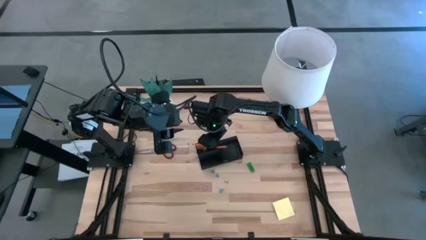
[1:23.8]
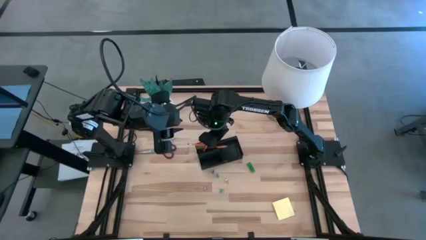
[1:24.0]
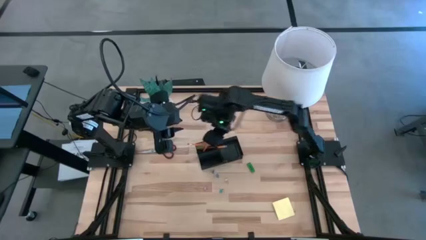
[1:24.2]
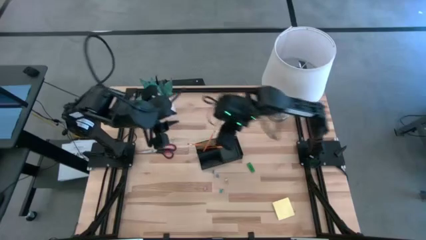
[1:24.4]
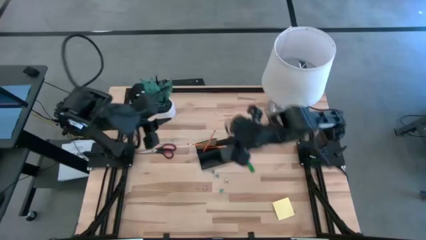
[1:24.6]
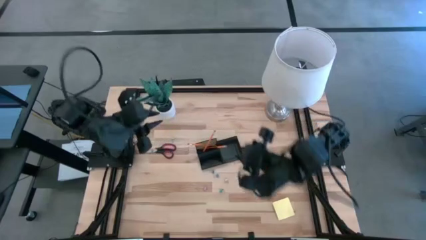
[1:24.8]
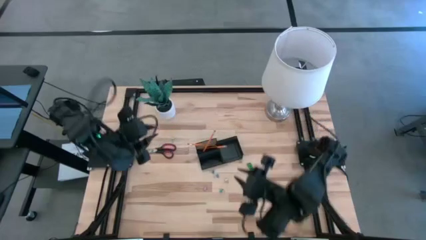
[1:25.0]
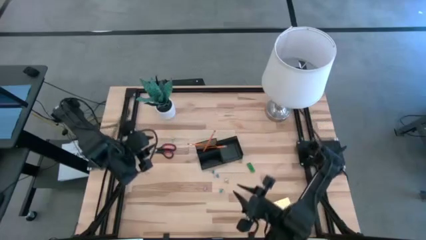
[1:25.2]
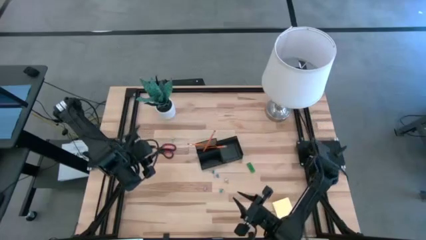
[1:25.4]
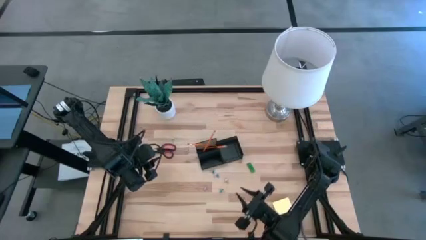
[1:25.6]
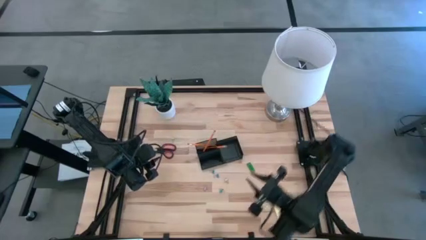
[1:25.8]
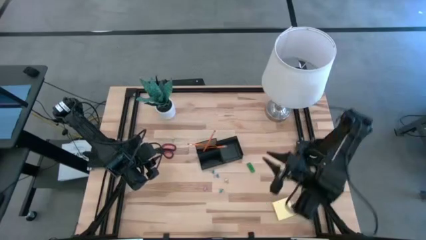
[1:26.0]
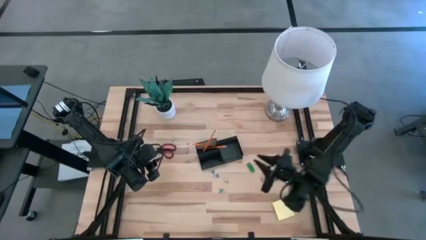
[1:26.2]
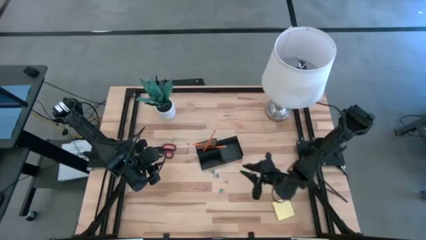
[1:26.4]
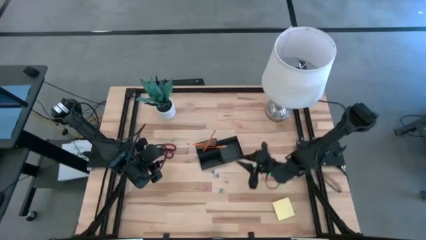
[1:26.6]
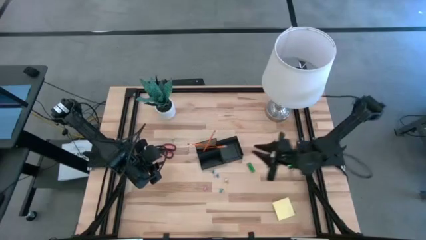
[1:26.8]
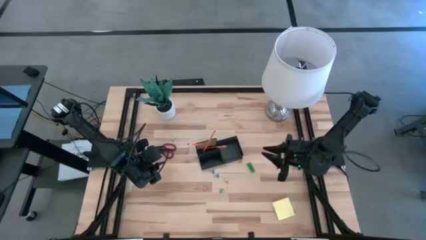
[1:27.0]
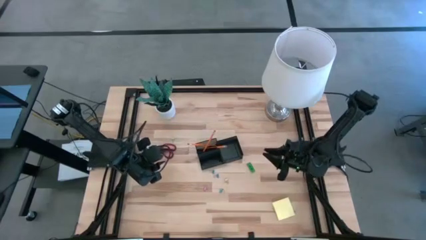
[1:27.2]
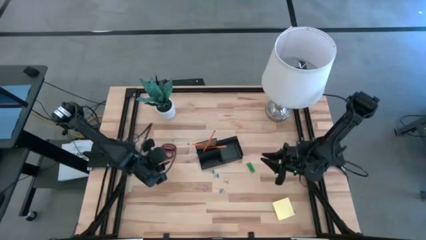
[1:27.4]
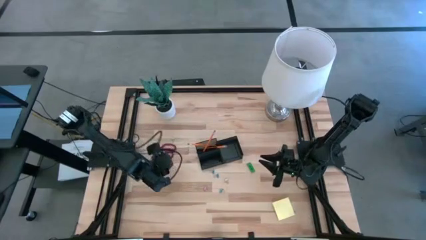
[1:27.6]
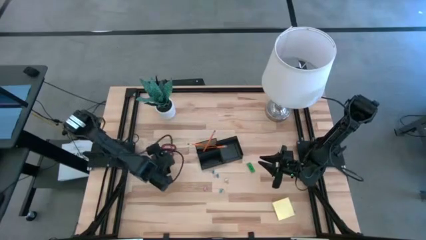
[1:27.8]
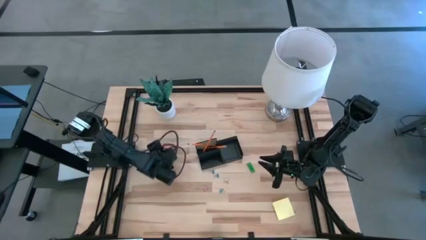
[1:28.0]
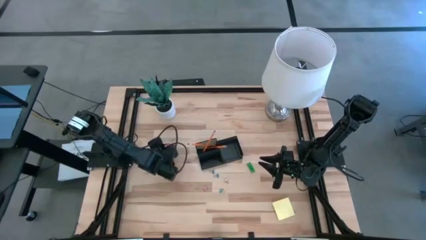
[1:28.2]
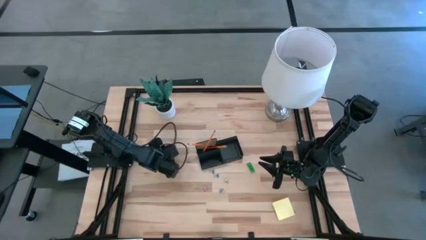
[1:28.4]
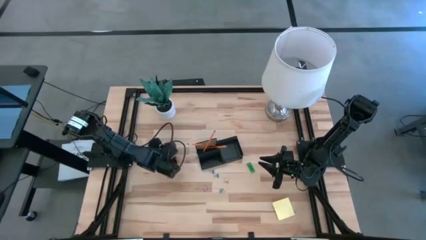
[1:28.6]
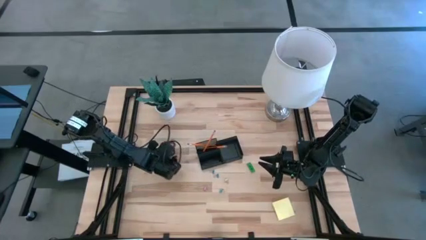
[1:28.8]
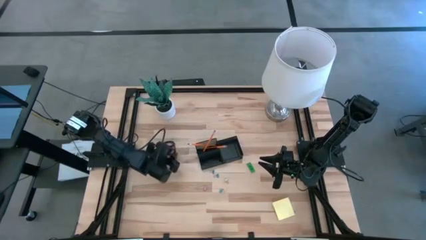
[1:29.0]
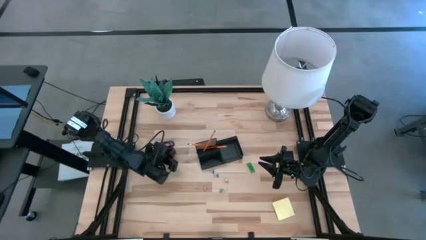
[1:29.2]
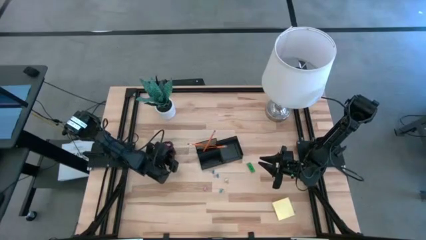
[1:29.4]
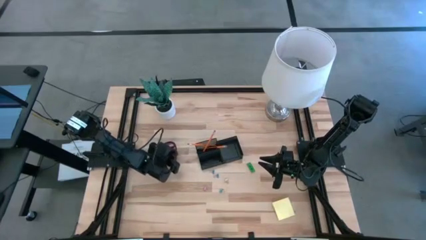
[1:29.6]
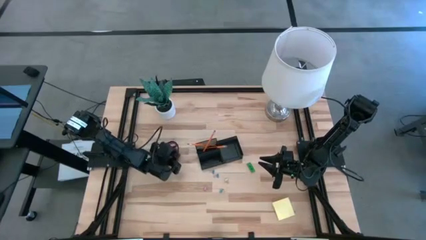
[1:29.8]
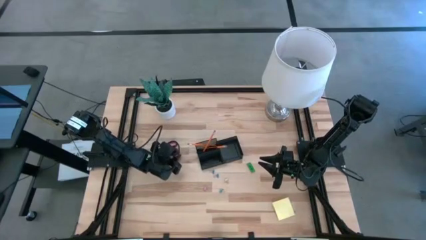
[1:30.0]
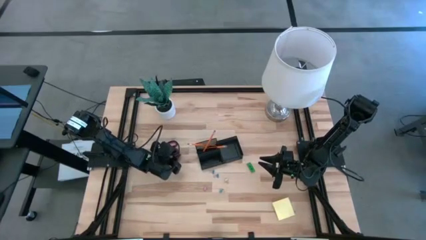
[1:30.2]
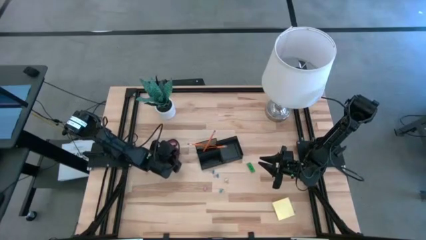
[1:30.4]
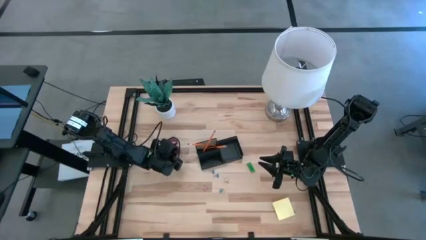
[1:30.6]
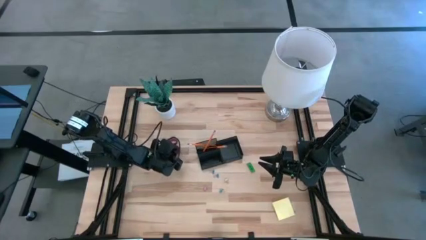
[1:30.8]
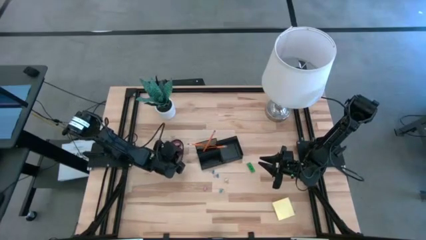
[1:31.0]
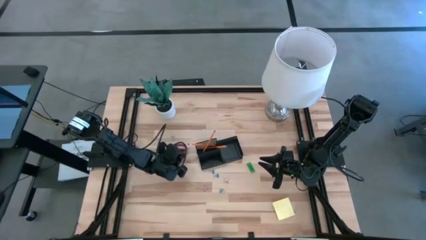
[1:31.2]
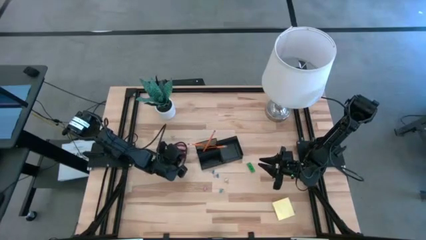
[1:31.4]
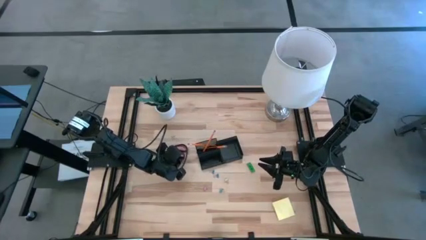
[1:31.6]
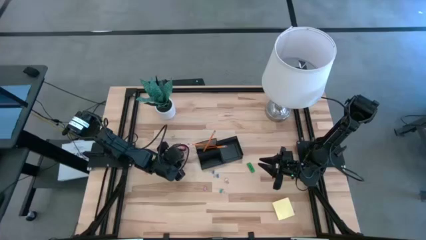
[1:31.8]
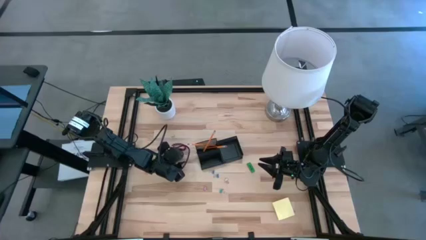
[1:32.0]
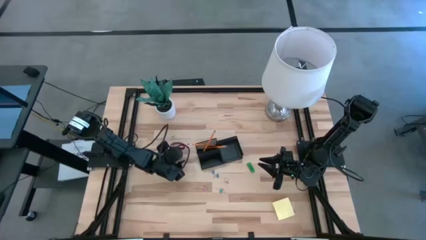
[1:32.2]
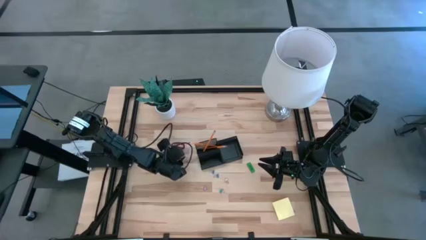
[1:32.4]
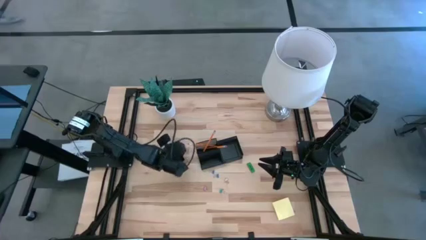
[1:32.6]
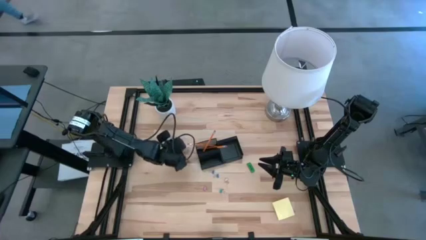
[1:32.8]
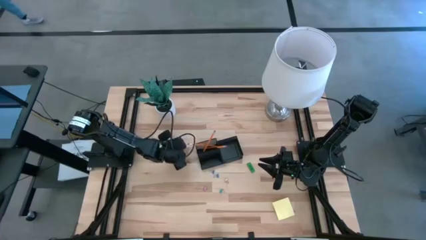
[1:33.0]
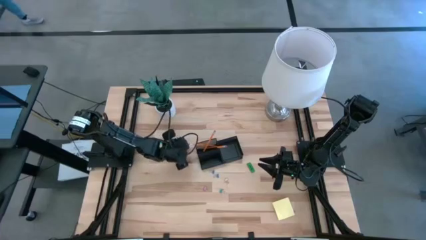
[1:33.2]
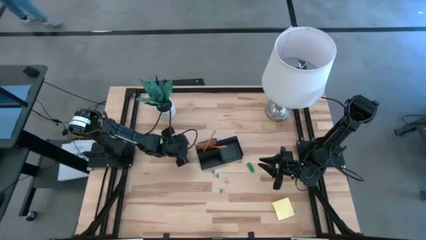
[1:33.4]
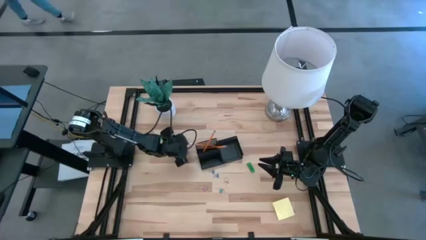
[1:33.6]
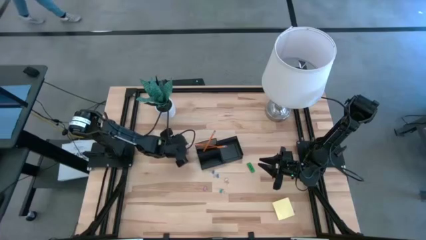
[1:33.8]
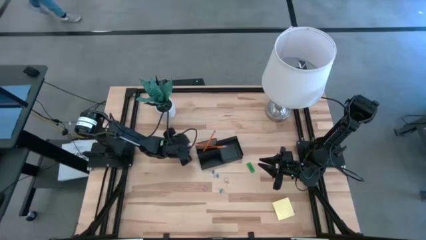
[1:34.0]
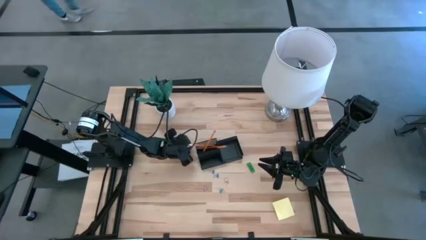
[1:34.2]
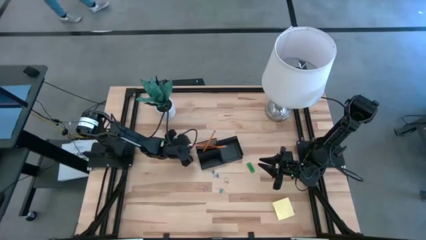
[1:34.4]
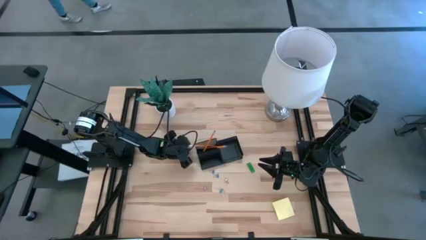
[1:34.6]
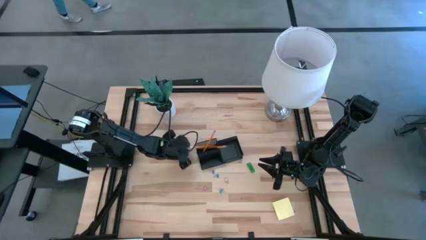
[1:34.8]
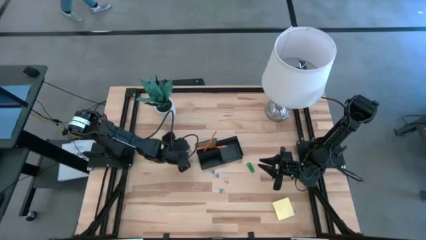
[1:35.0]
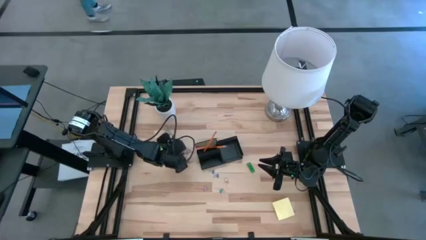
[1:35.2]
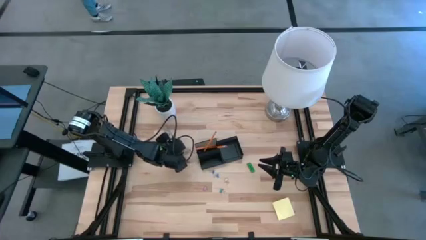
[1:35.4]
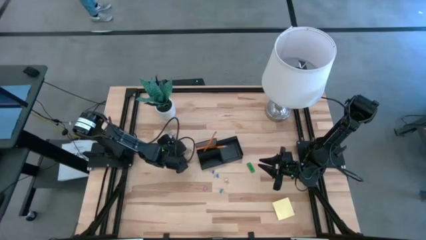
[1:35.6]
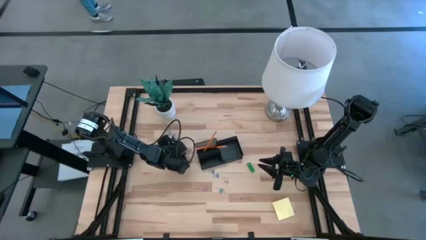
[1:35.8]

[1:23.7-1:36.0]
Task: Pick and place office supplies into organizer
Put the black scissors into the black desk organizer

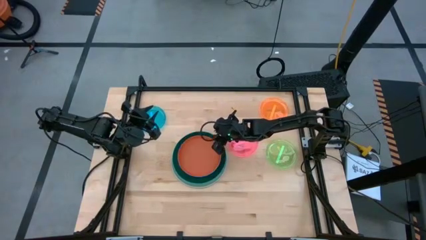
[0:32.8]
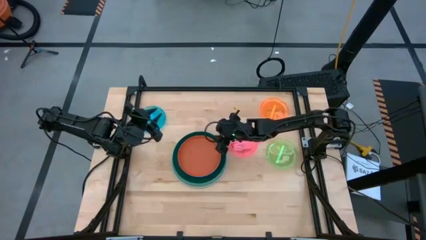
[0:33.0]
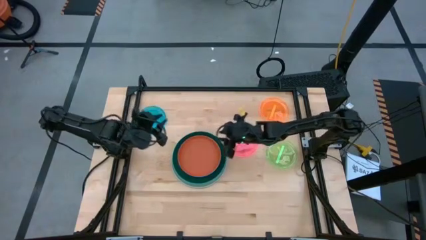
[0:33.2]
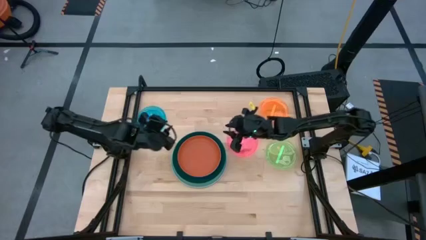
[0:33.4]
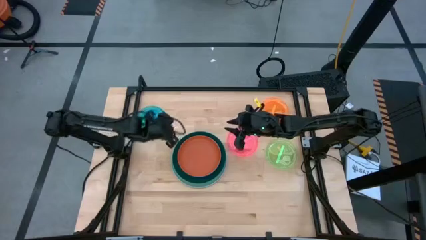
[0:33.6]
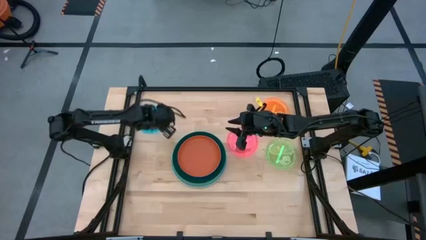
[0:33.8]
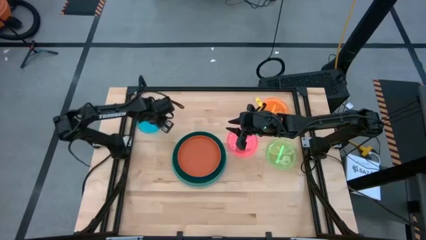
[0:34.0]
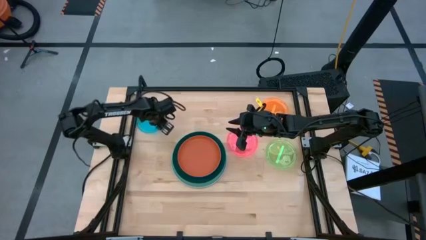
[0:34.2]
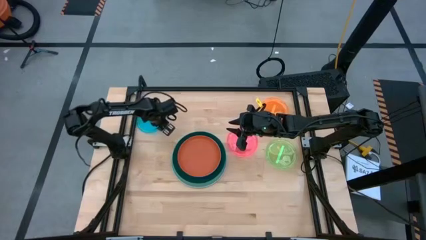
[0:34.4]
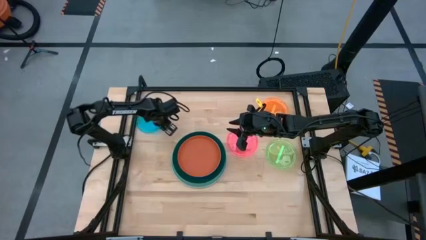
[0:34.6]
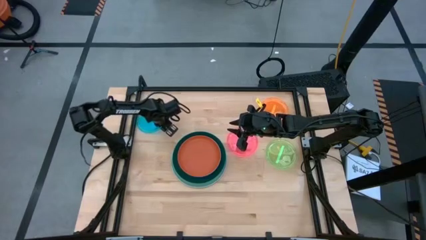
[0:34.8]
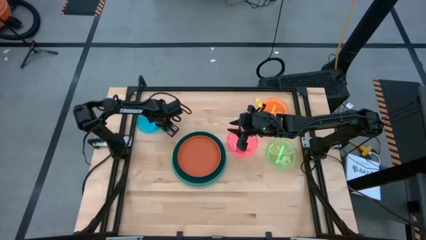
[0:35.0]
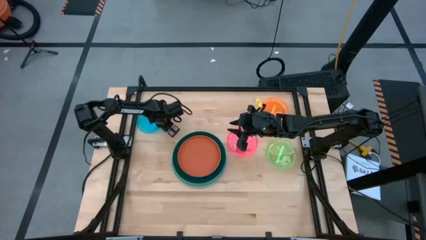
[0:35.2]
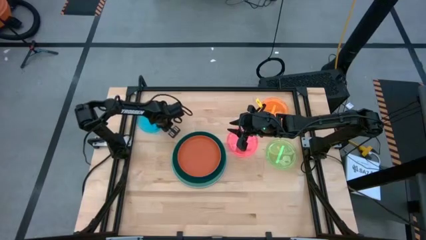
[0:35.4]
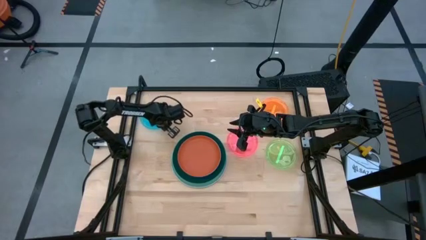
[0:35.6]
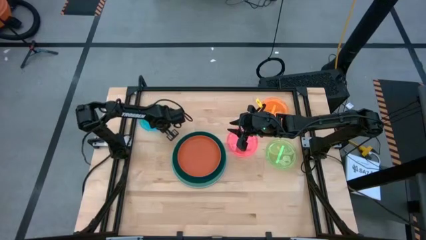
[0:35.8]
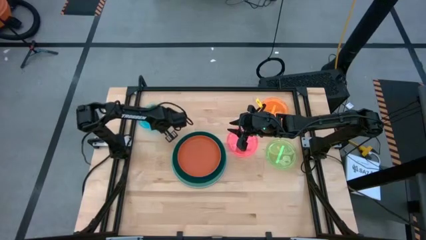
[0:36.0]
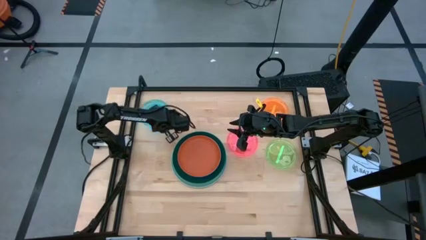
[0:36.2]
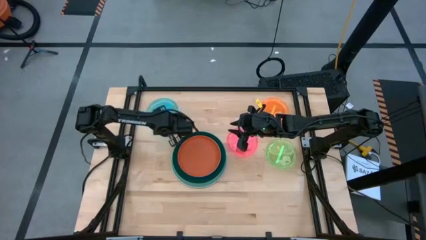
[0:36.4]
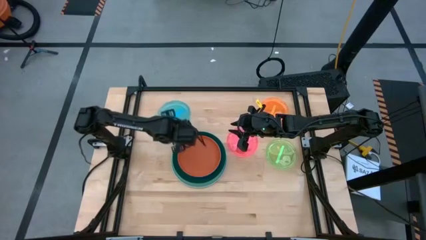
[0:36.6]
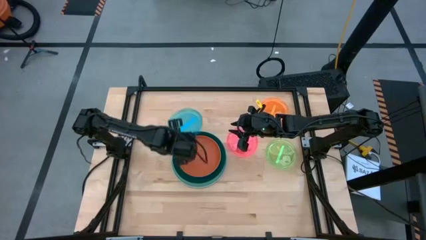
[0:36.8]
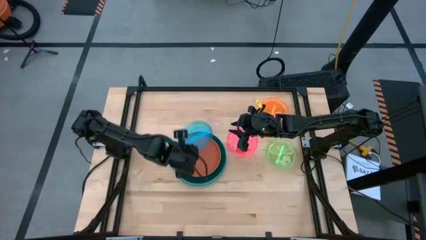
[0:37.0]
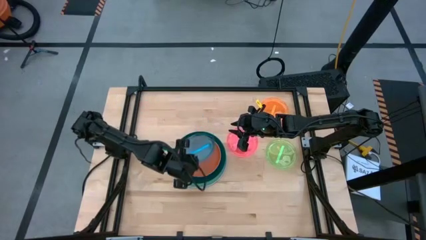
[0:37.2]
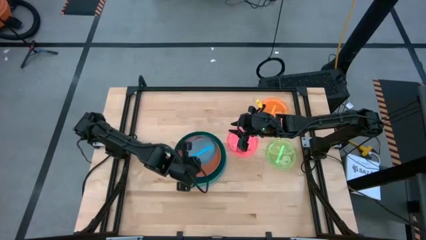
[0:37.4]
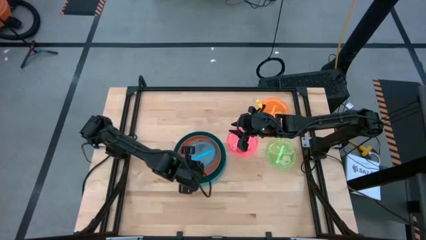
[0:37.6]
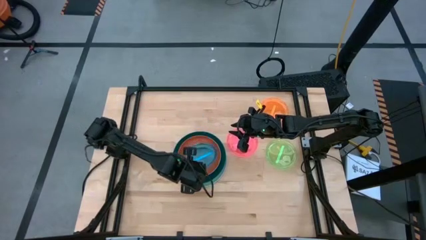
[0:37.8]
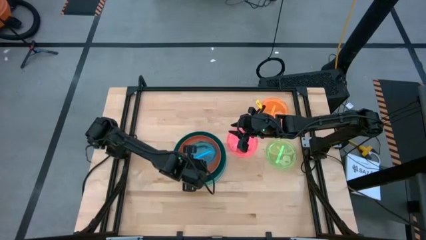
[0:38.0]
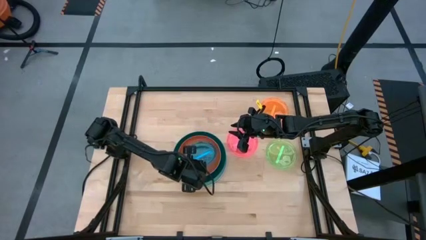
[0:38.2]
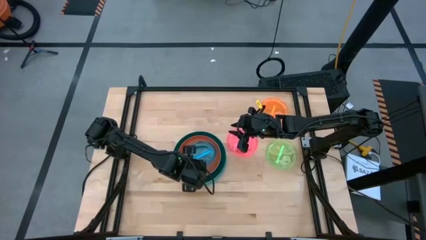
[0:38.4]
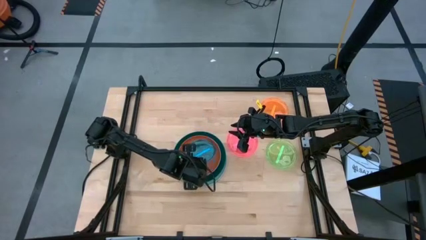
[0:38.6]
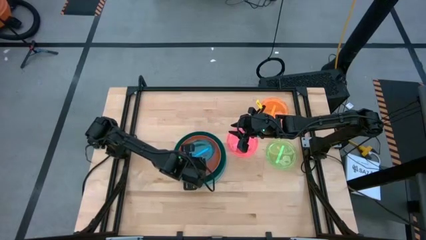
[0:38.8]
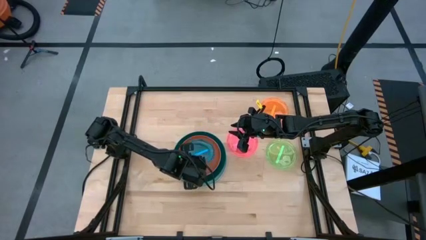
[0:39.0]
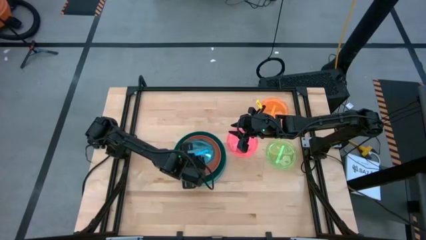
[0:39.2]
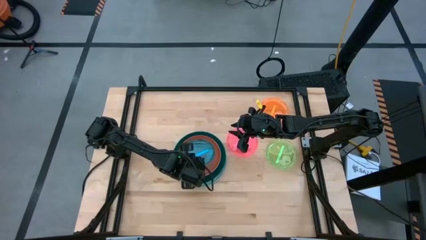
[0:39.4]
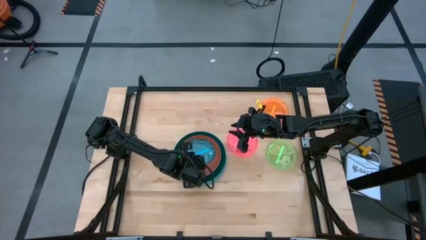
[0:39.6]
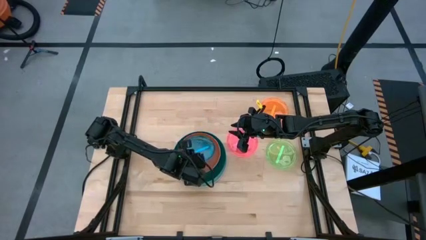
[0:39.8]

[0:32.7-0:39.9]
Task: Stack plastic plates
Stack the light blue plate on top of the orange plate
